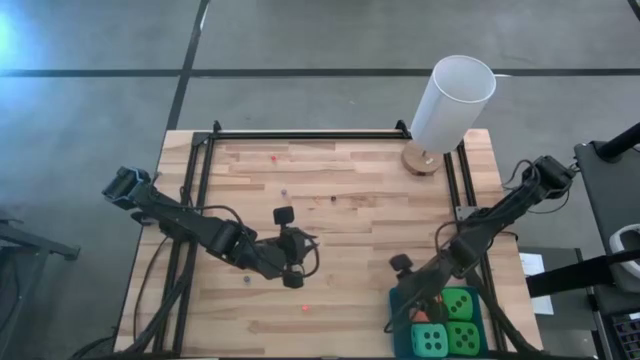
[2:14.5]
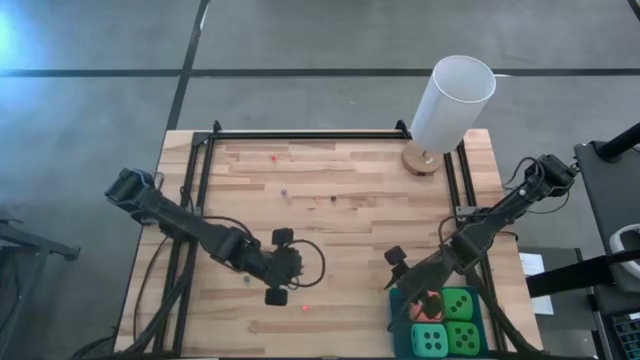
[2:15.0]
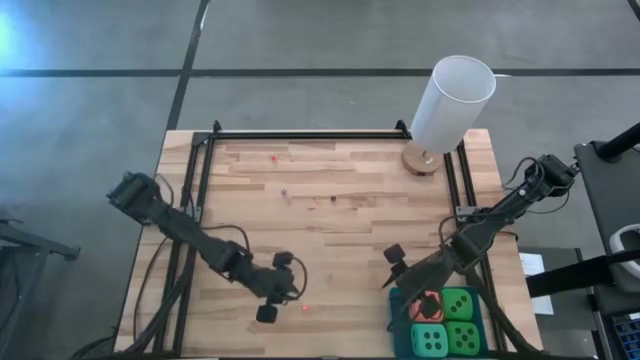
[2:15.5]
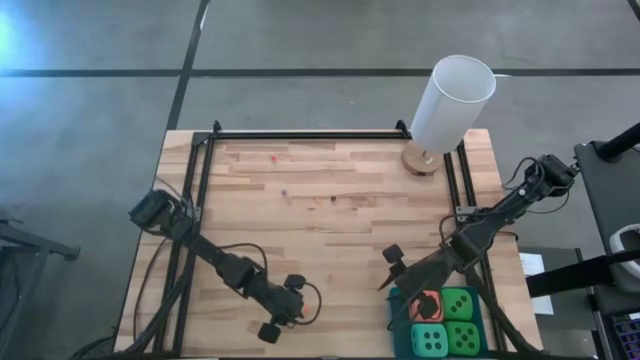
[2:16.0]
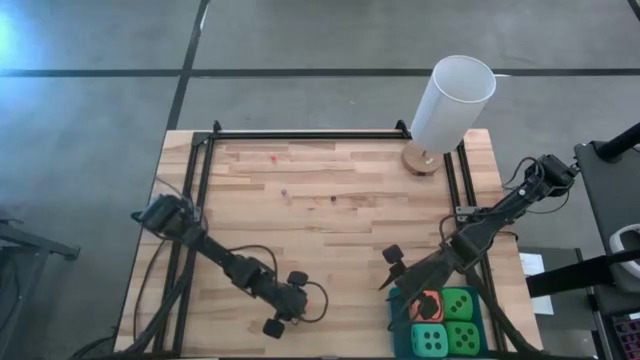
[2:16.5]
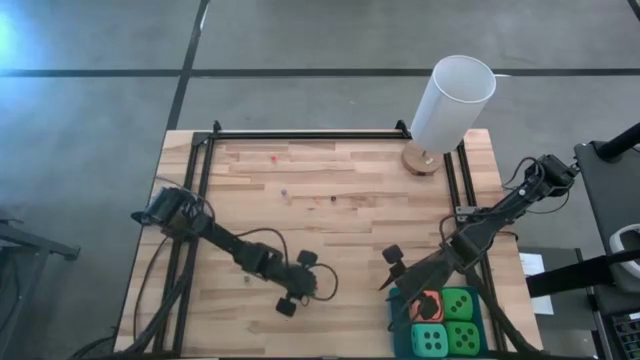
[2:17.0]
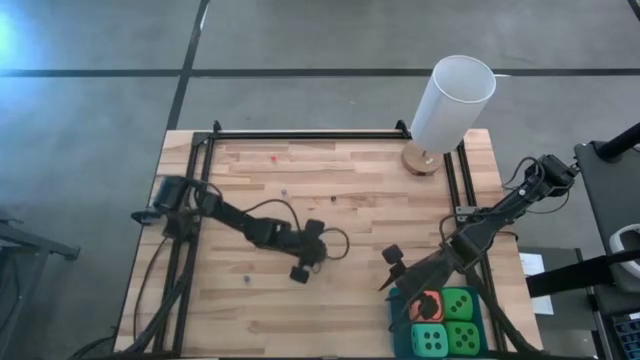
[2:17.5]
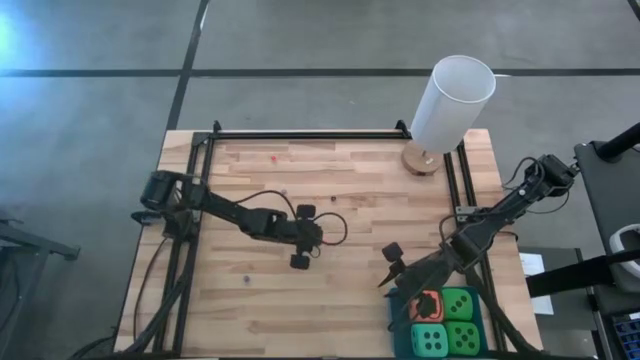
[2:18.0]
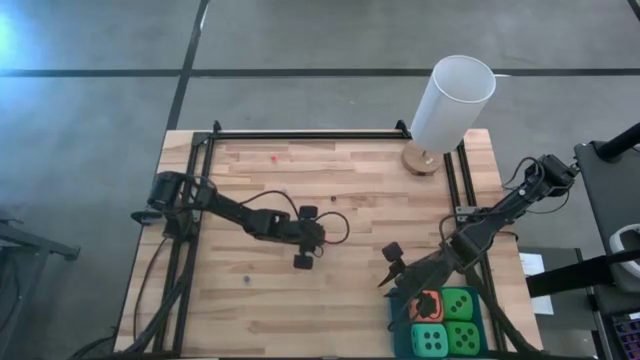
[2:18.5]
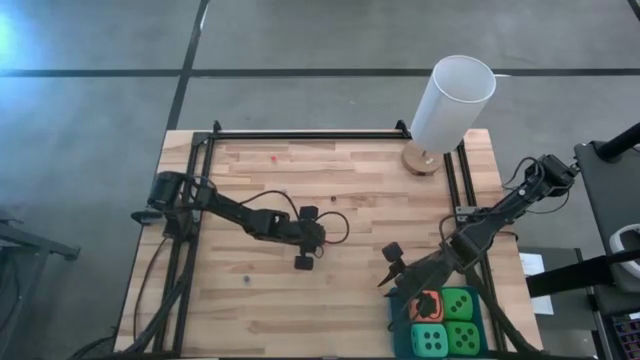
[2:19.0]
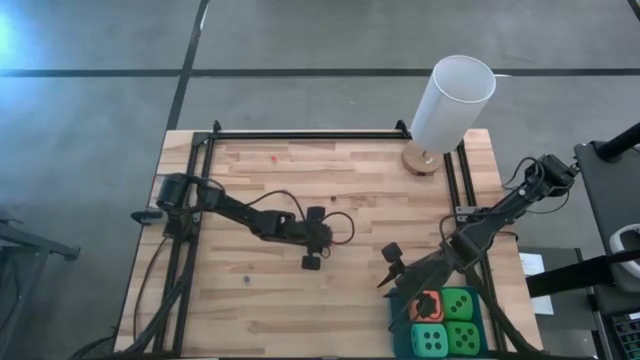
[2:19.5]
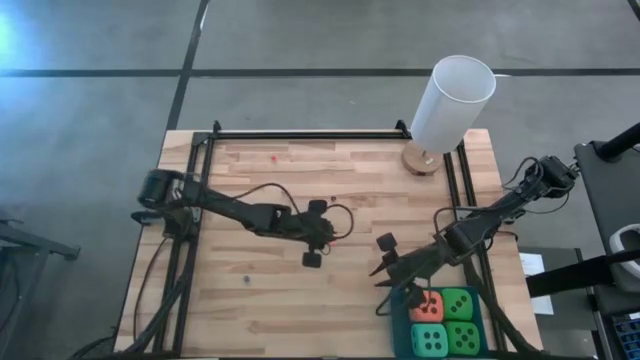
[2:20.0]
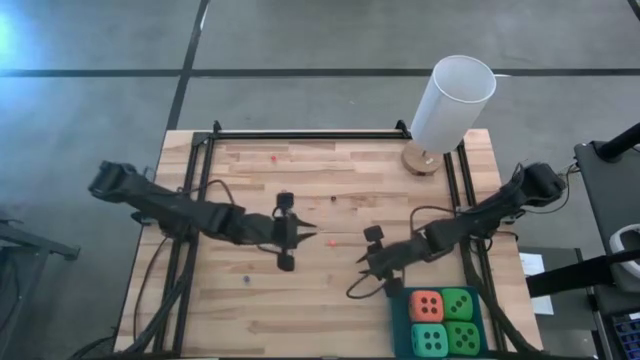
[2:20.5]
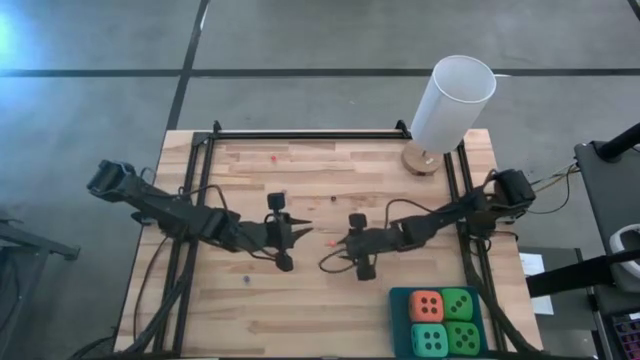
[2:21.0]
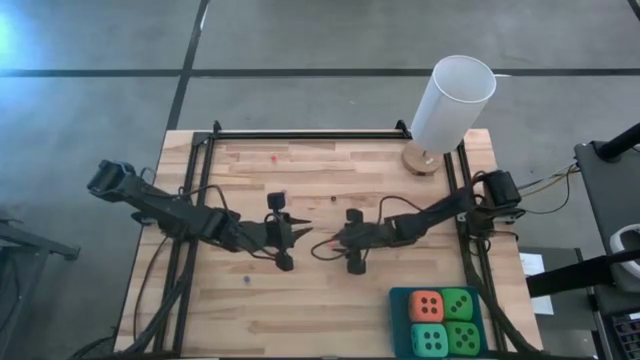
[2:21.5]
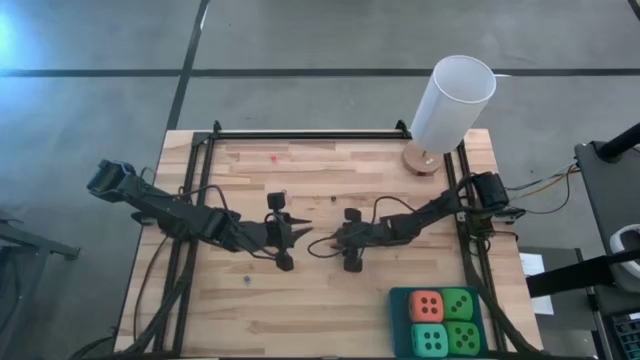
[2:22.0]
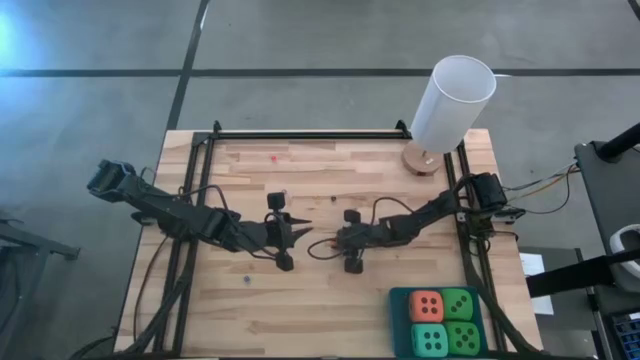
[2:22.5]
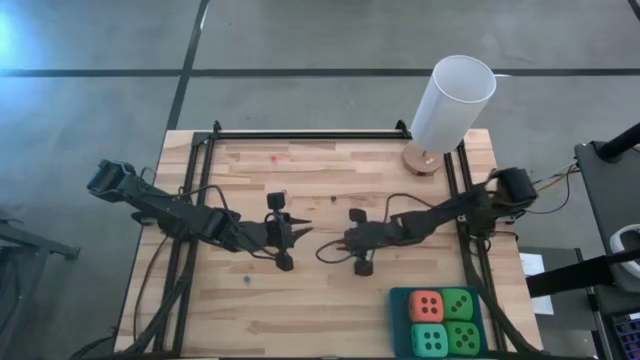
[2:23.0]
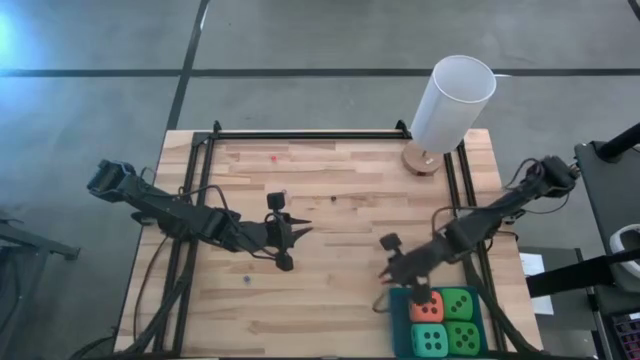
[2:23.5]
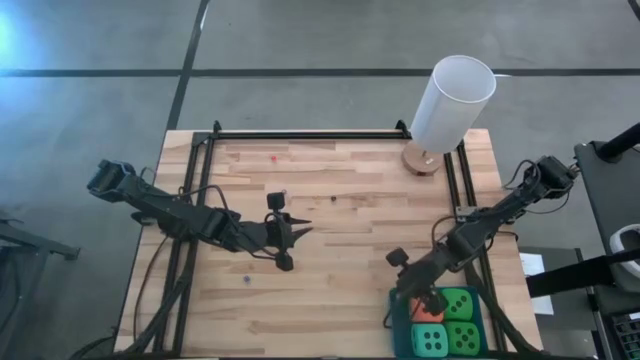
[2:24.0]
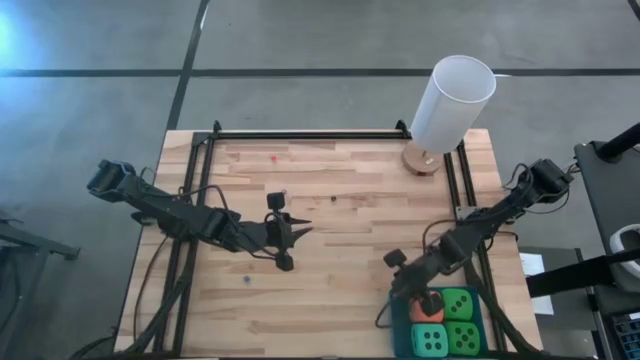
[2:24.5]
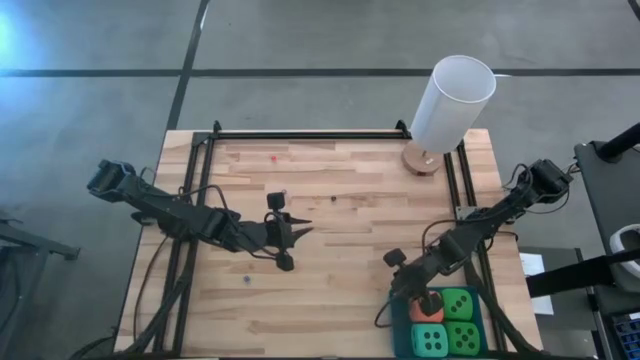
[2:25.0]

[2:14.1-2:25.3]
Task: Pick & Place Dice
Put the small orange die into the blue bin

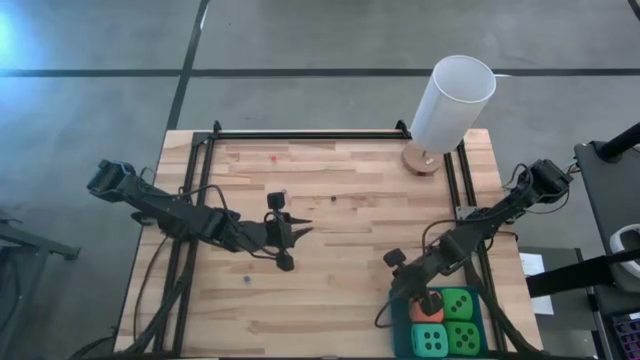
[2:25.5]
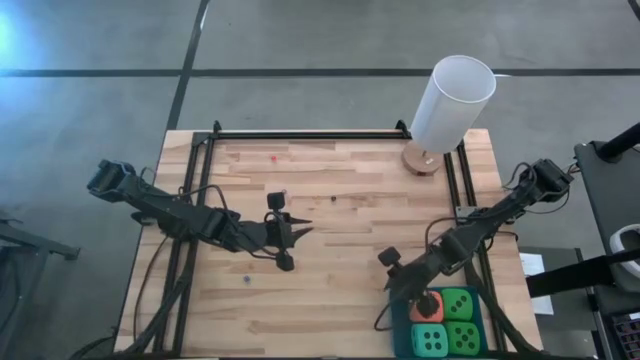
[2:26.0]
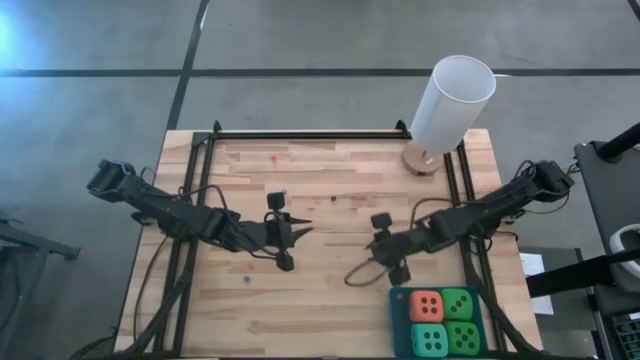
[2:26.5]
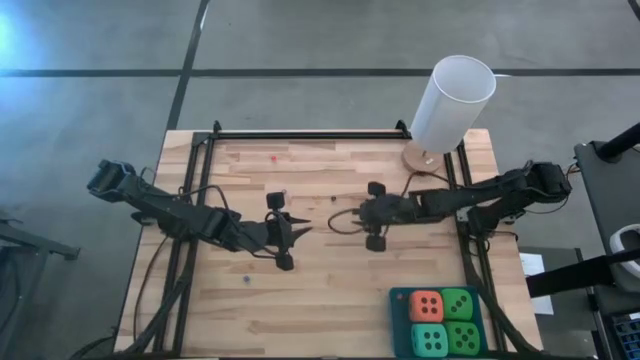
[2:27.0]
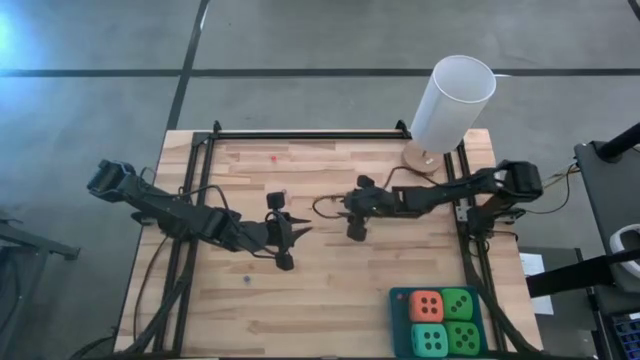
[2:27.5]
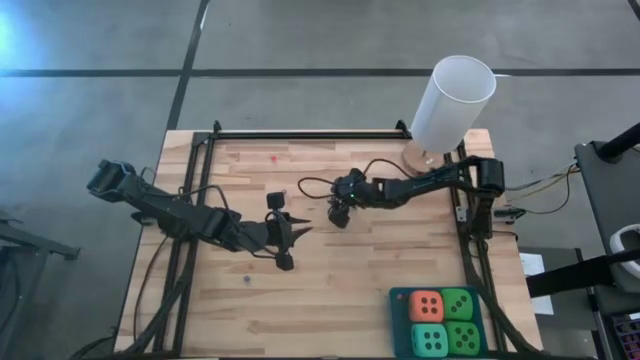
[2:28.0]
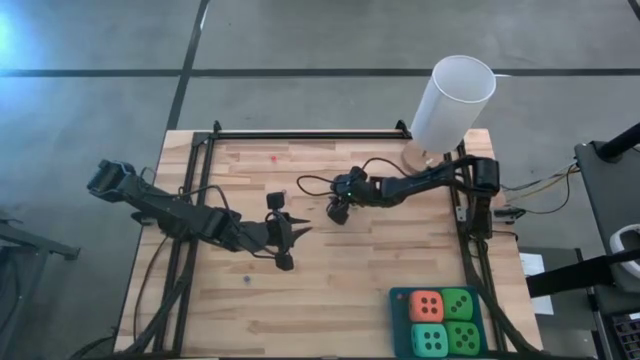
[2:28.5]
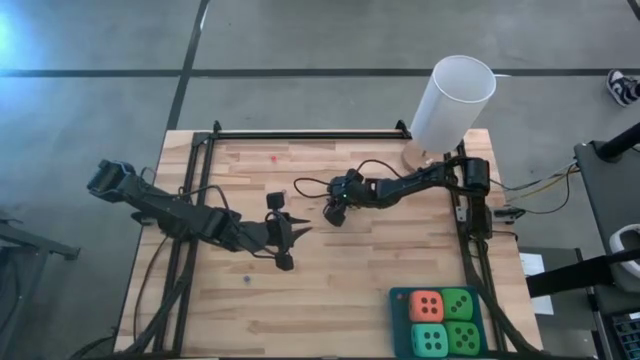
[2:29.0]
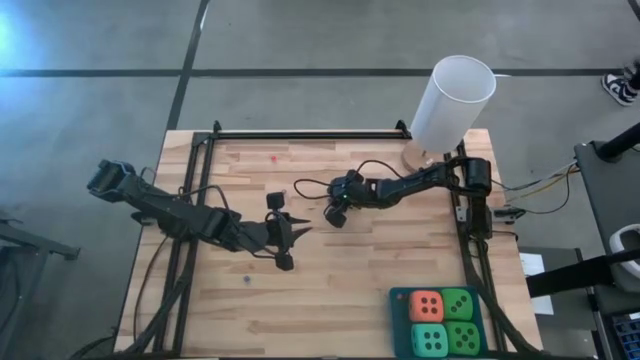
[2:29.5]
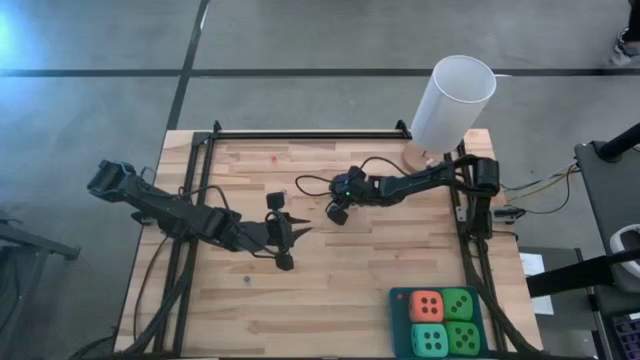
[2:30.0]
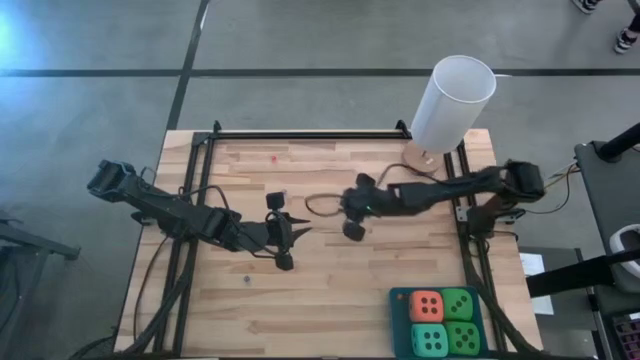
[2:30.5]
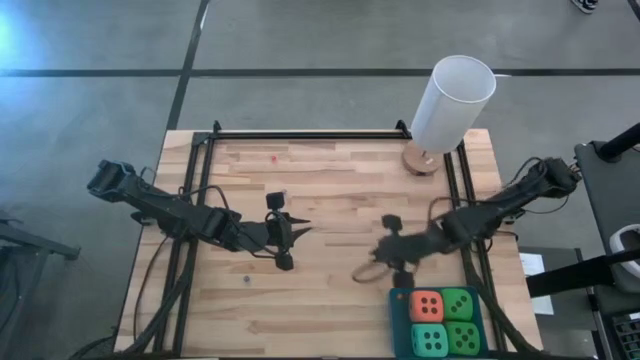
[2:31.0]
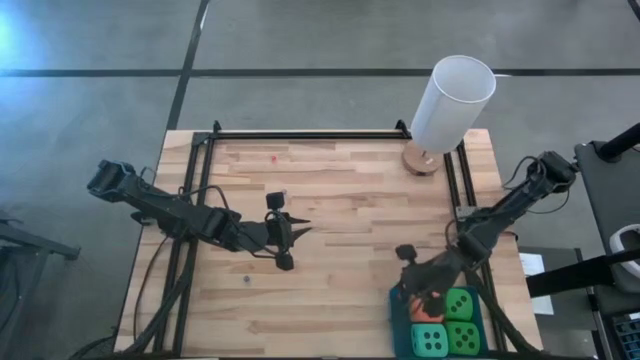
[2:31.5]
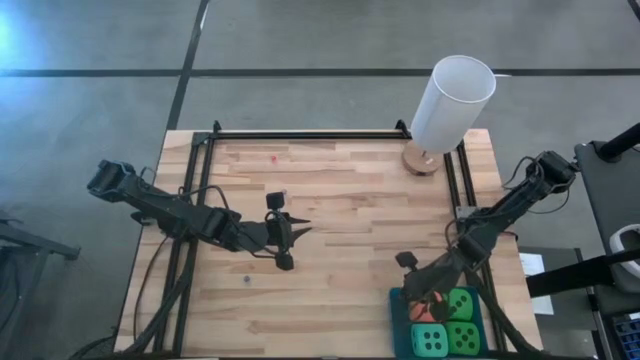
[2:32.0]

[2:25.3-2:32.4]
Put the small black die into the blue bin

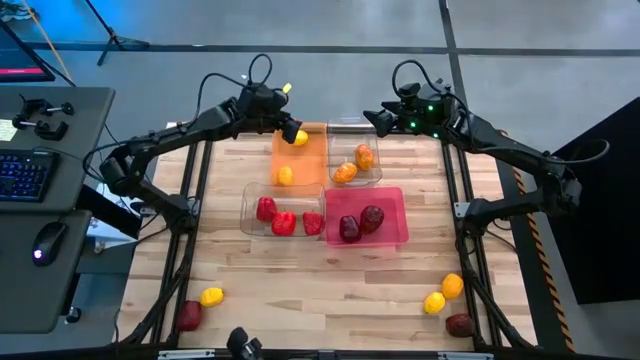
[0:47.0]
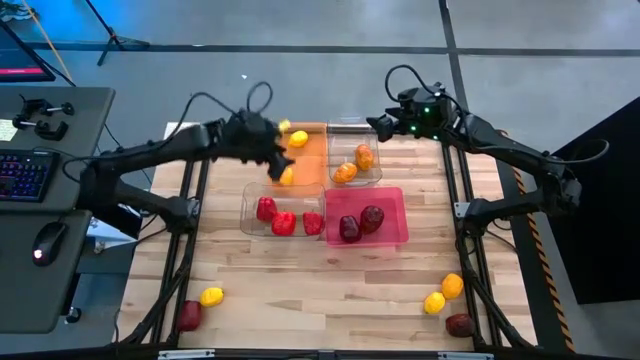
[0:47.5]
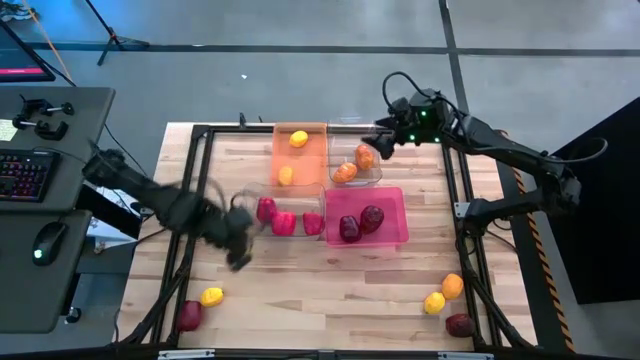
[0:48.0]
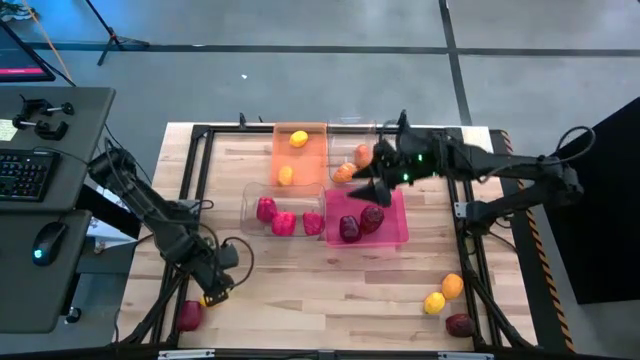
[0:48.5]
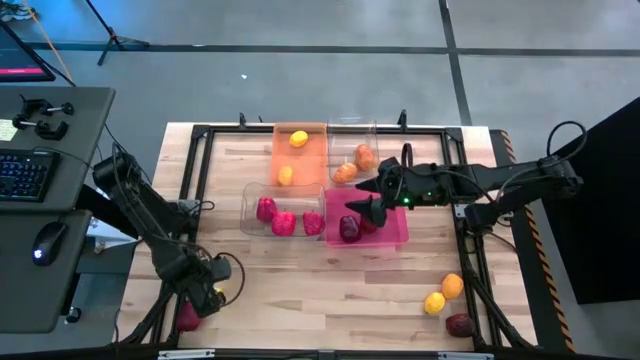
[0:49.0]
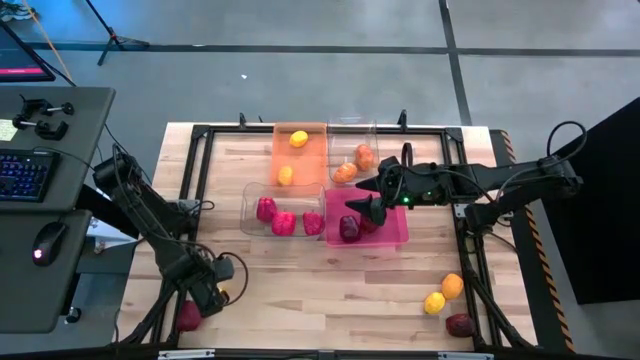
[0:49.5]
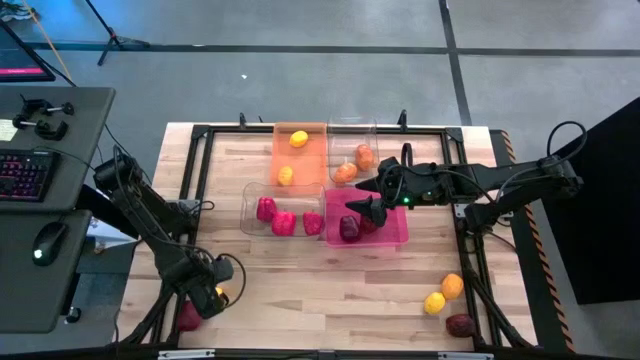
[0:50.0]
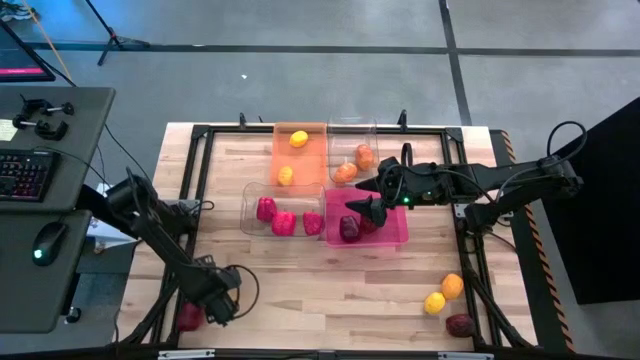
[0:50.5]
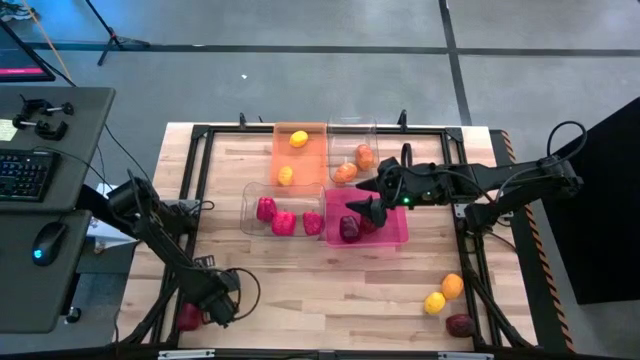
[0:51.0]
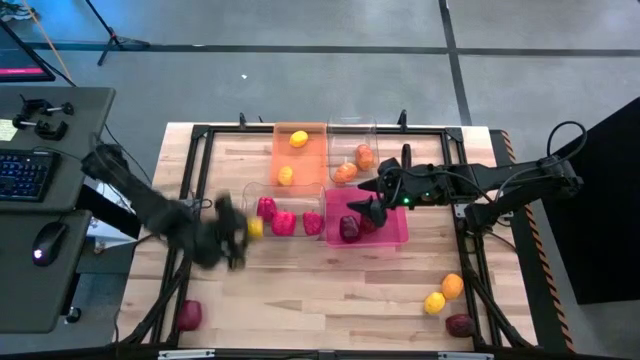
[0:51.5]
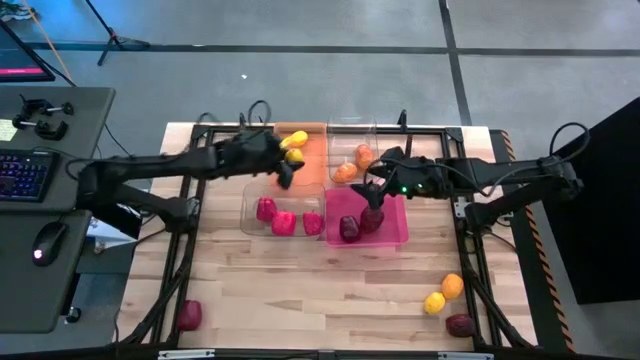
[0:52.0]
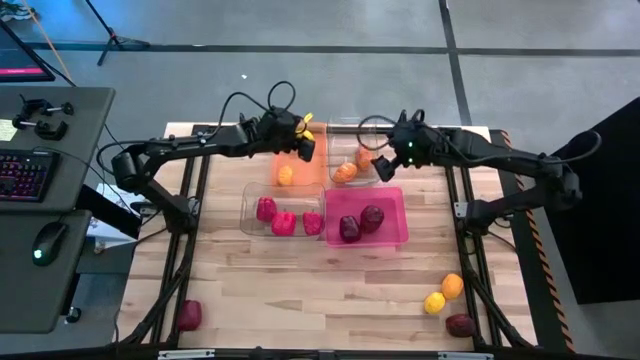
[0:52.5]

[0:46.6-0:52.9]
Task: Sort produce into baskets
Put the lemon into the orange bin
